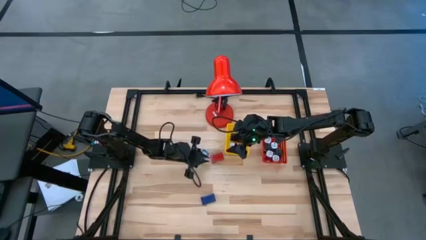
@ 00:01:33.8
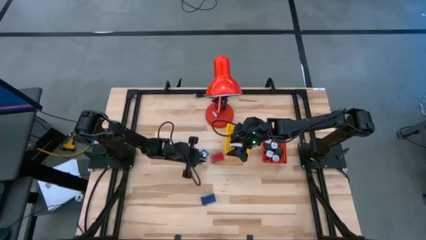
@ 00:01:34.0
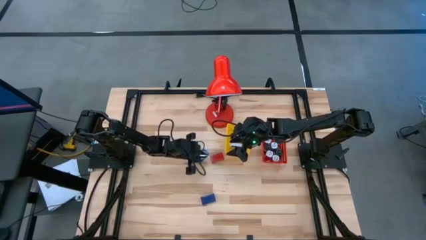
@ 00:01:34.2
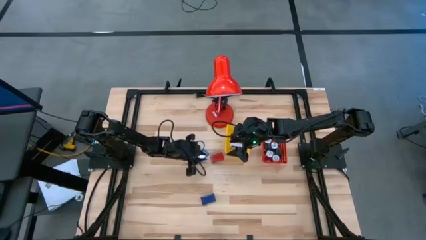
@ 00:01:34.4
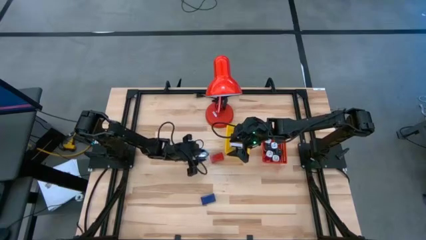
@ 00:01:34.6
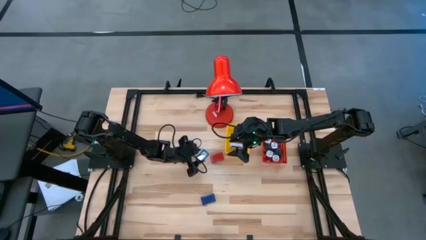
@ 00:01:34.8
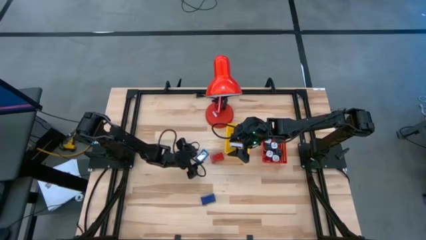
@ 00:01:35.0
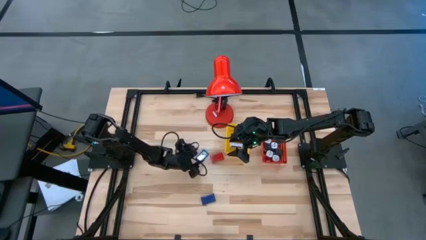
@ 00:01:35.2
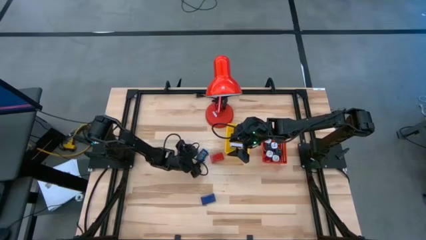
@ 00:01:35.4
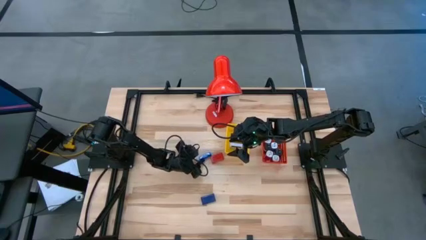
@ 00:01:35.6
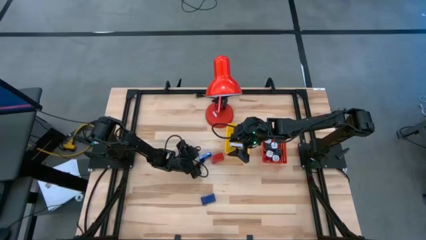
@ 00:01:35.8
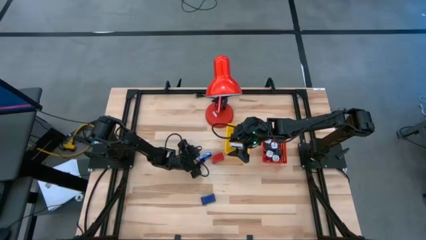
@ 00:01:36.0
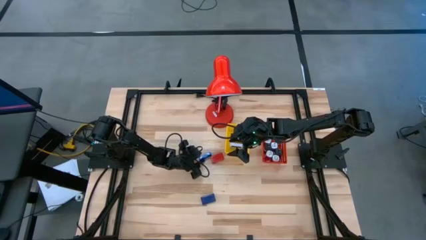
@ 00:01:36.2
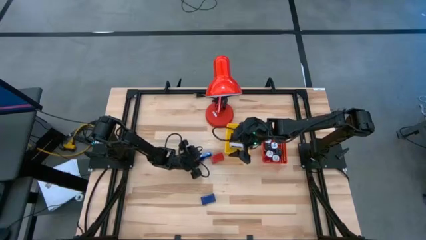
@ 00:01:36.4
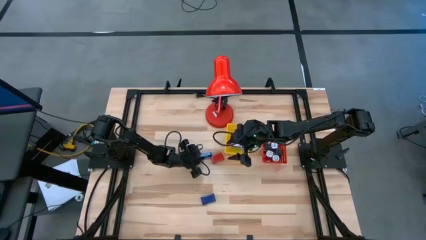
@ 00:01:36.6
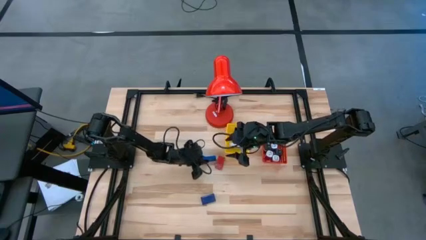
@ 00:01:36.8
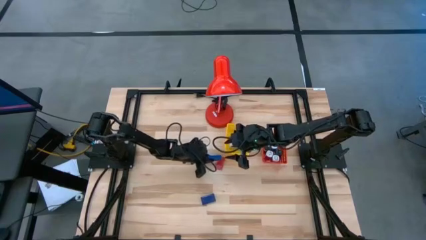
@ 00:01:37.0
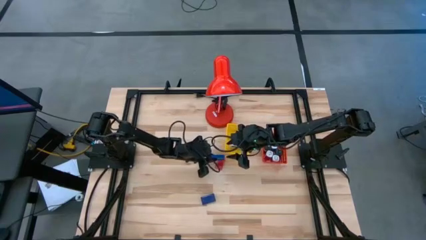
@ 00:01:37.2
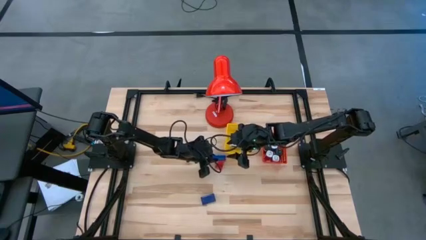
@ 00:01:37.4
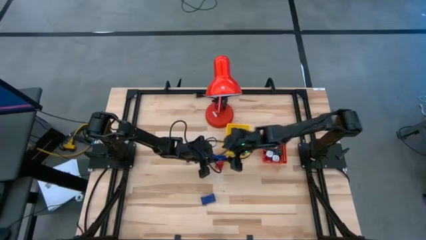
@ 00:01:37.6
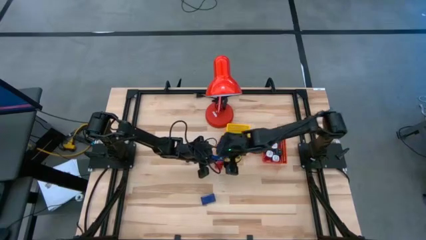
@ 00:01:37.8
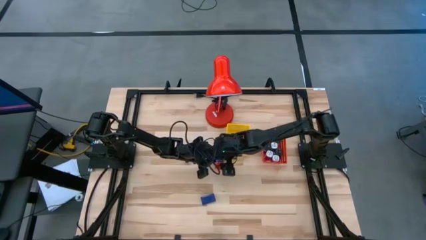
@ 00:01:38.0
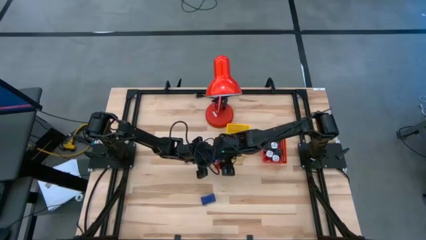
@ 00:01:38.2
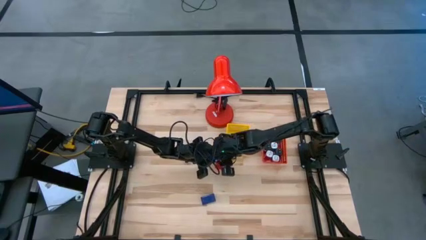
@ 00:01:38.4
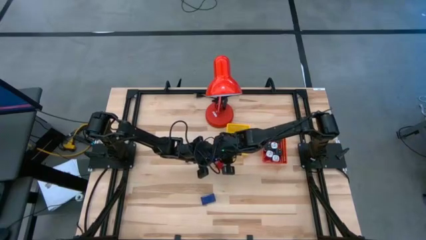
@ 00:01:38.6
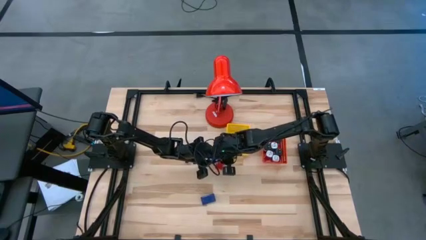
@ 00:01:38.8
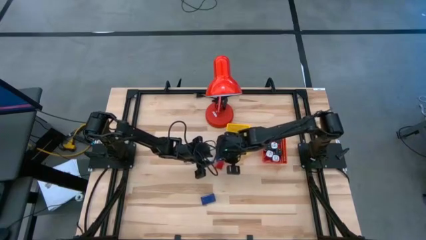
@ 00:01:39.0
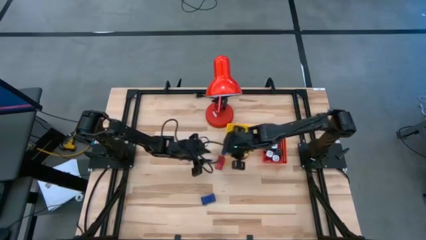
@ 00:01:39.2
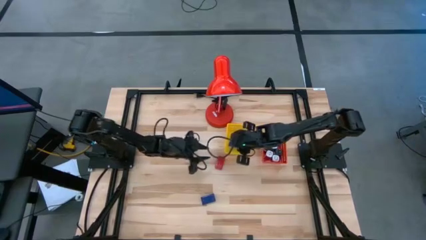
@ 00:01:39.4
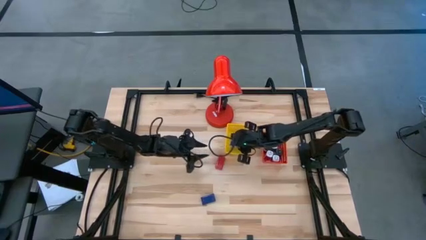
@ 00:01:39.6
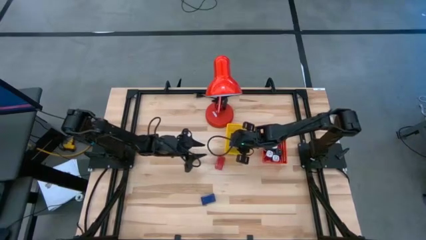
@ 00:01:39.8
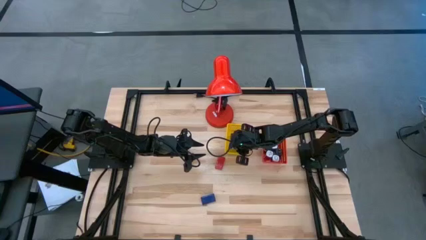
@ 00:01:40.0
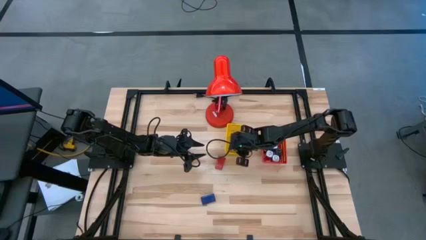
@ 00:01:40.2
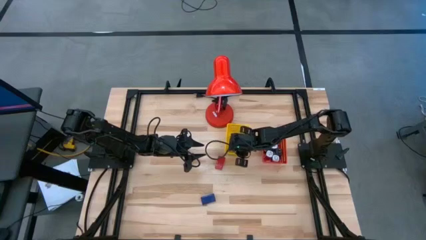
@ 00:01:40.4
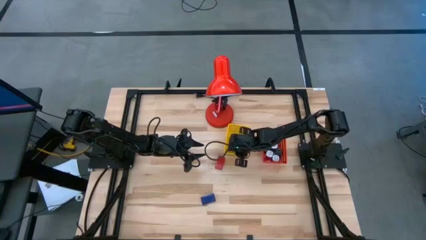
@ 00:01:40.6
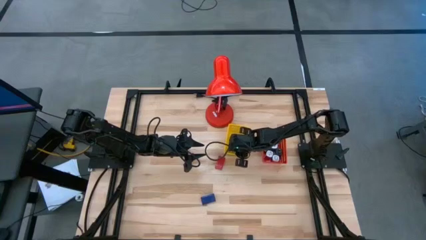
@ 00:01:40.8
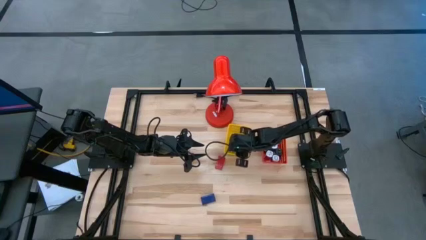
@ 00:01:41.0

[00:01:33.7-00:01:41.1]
Task: Pick & Place Office items
Put the top blue digital clock into the yellow bin

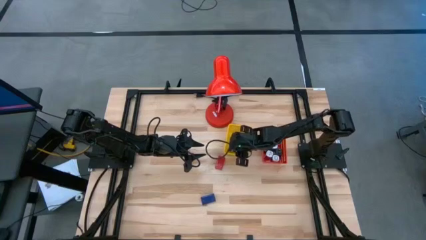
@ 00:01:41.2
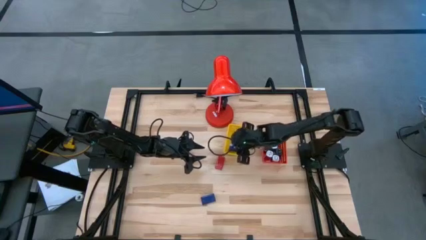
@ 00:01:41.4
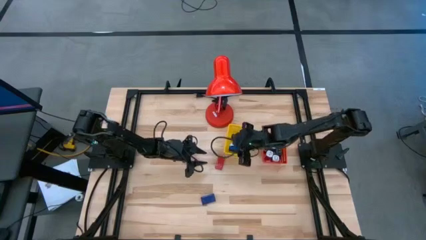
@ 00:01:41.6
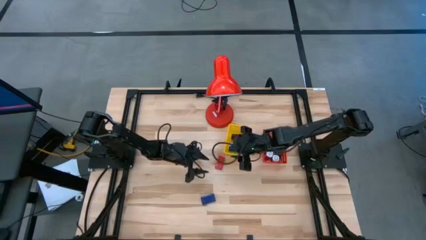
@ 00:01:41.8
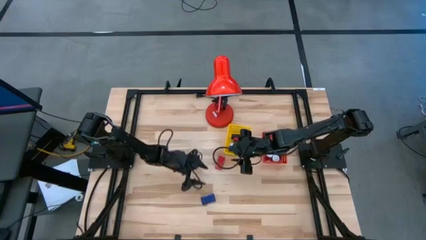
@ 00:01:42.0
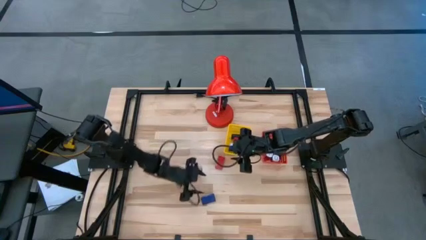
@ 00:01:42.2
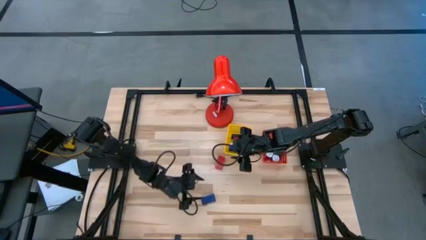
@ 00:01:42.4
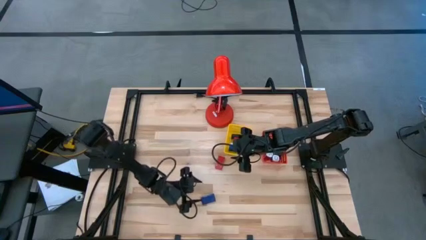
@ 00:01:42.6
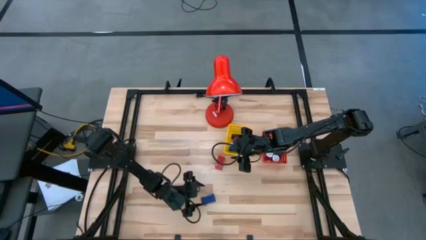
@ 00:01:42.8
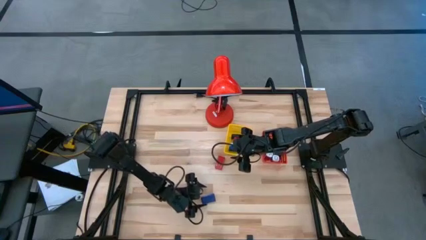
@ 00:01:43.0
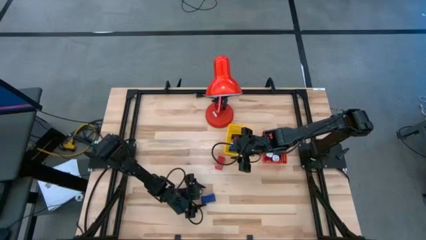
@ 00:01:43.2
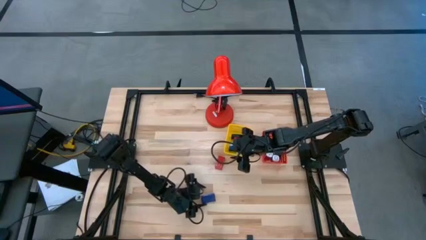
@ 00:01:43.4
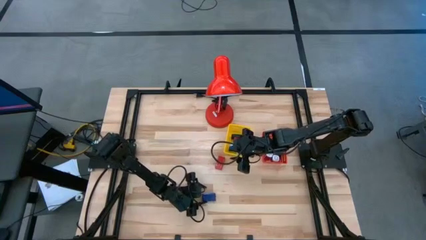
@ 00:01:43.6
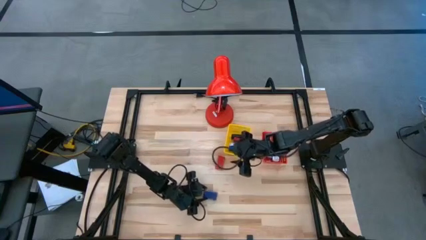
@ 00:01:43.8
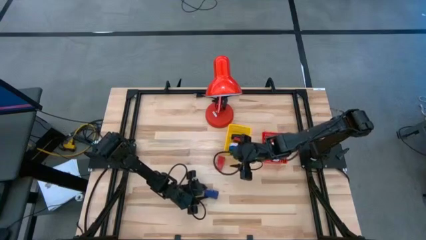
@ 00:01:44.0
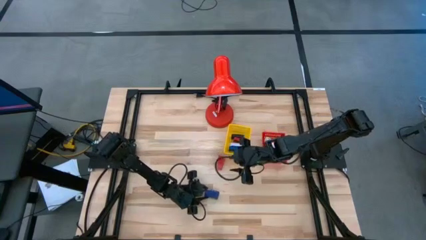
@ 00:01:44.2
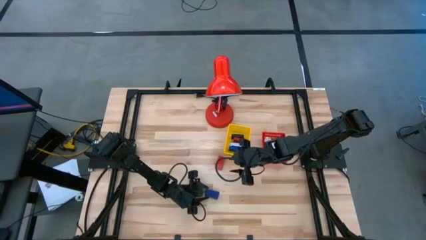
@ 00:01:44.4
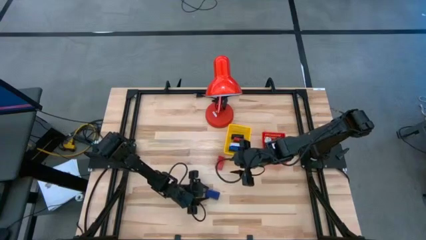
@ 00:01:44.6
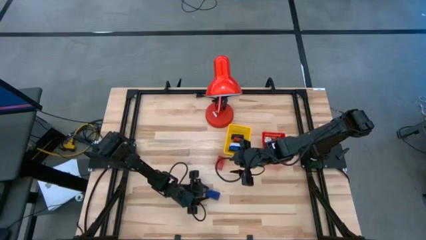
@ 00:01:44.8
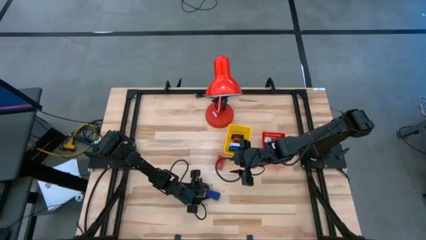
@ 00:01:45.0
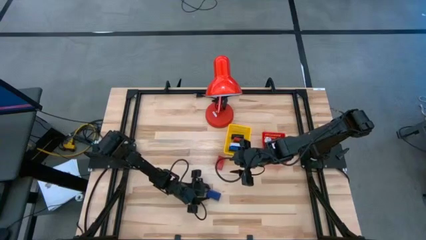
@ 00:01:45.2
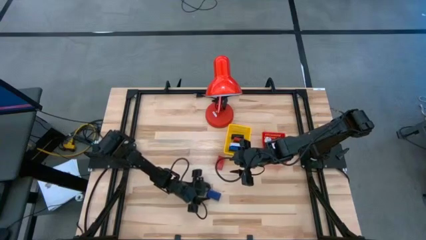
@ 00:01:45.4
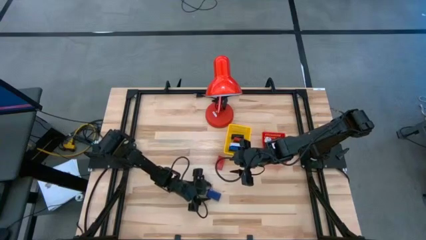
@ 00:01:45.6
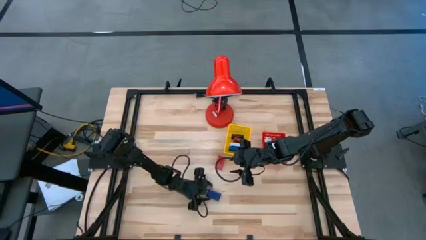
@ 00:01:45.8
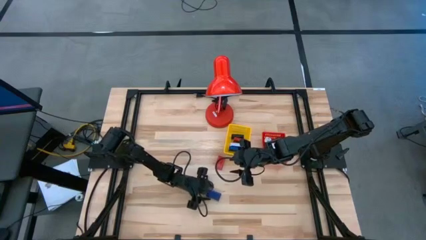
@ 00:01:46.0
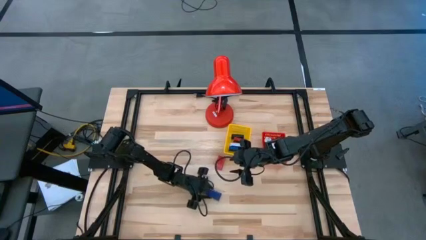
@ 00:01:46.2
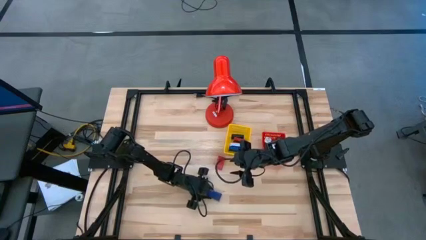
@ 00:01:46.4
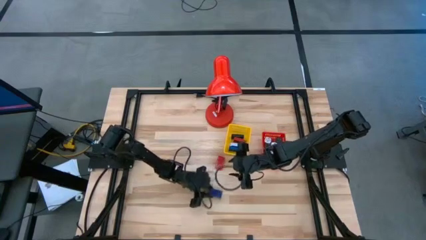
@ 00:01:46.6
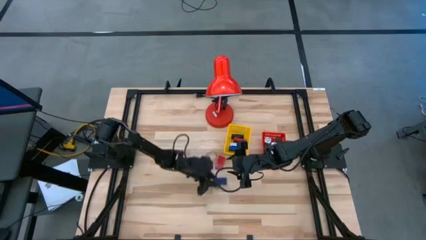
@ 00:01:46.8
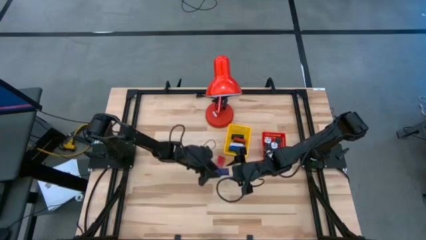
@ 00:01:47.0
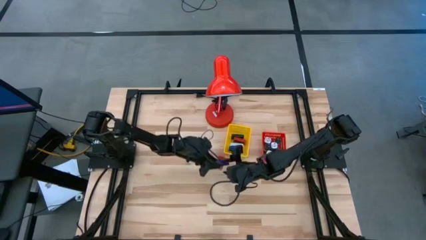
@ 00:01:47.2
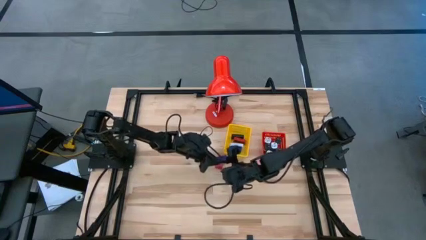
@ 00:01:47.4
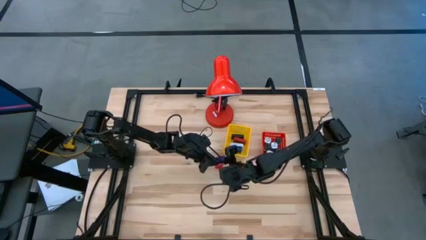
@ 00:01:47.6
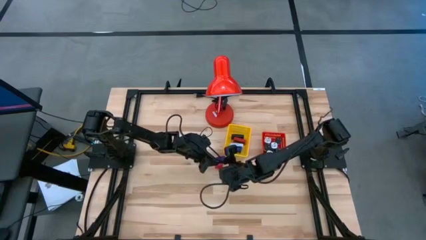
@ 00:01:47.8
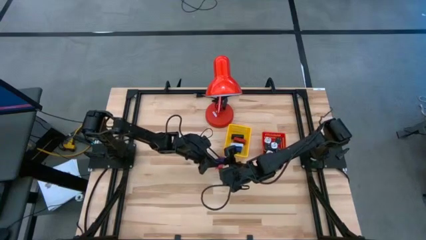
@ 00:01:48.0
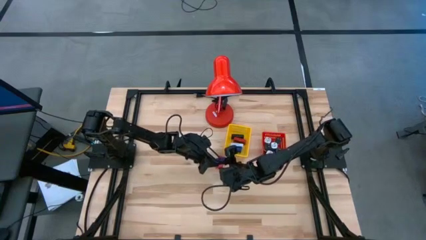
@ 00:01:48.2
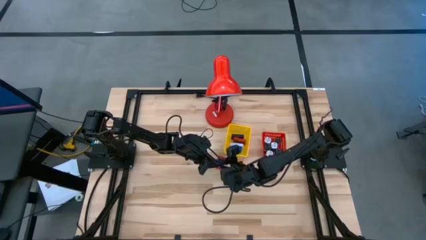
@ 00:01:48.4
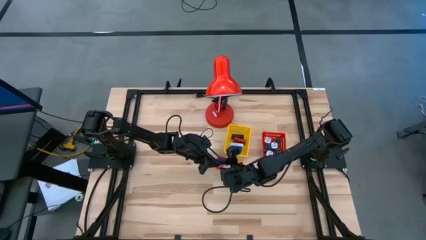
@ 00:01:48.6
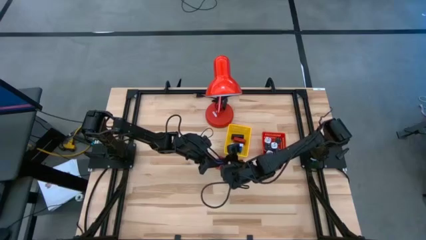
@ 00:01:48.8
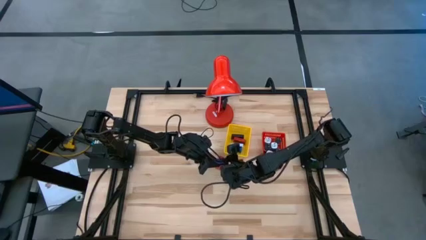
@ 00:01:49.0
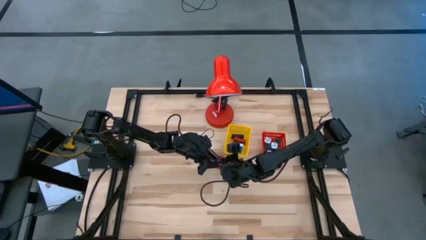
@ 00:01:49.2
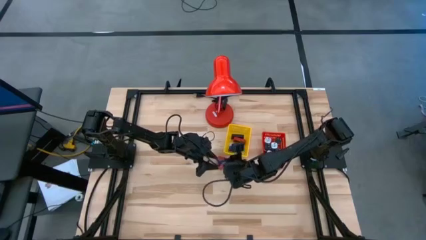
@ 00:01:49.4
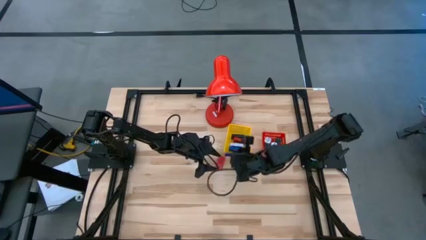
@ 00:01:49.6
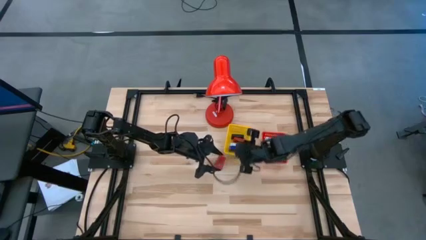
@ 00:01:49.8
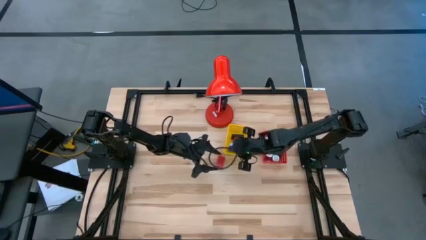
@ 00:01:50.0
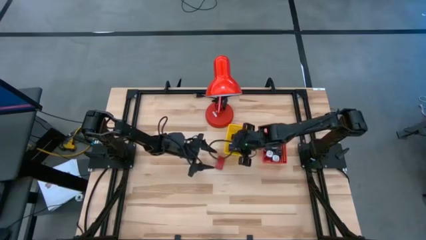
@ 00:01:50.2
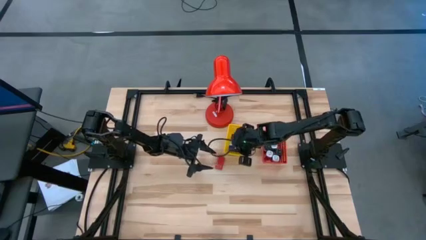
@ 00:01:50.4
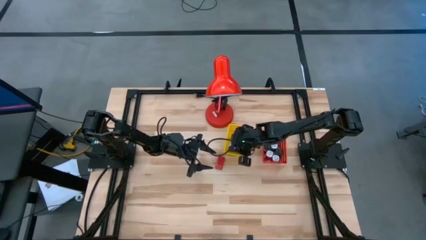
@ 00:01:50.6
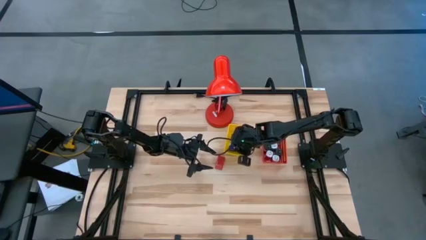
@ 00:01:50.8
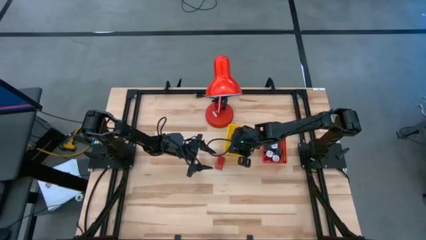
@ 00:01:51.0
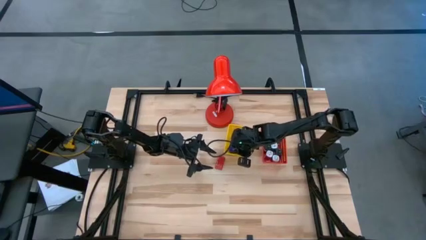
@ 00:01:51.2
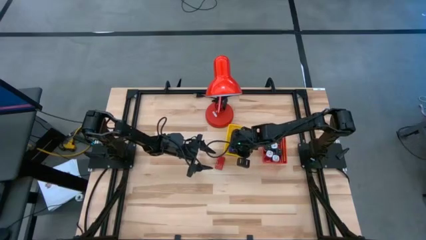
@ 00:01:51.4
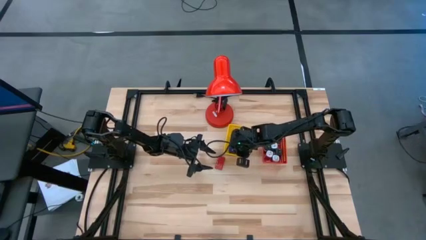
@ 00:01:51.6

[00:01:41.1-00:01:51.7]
Put the blue digital clock into the yellow bin
